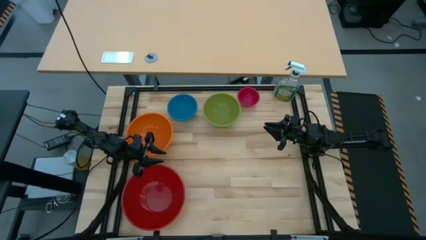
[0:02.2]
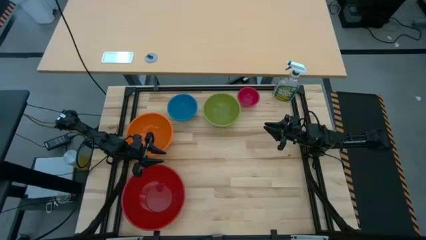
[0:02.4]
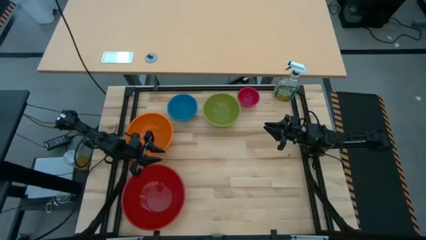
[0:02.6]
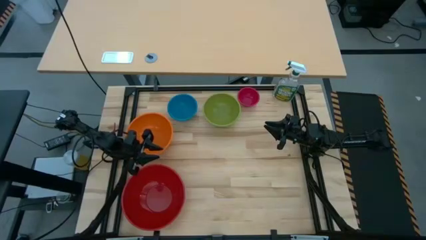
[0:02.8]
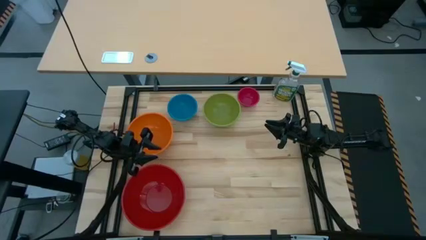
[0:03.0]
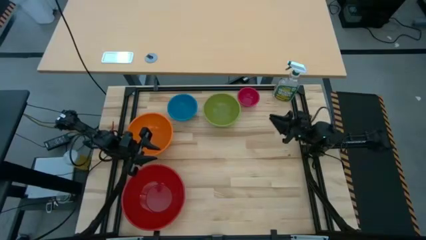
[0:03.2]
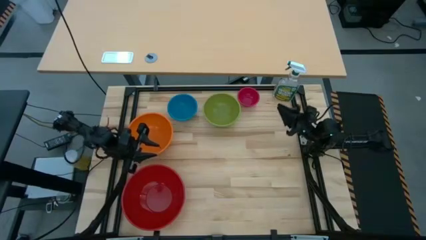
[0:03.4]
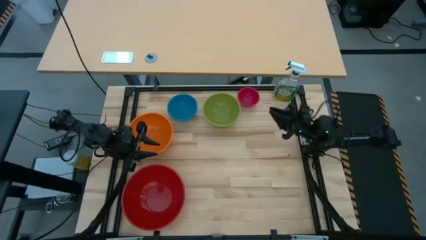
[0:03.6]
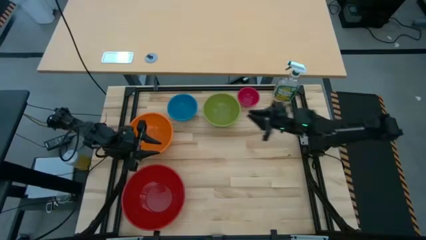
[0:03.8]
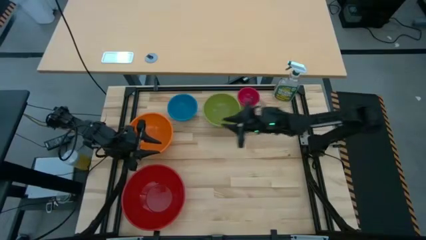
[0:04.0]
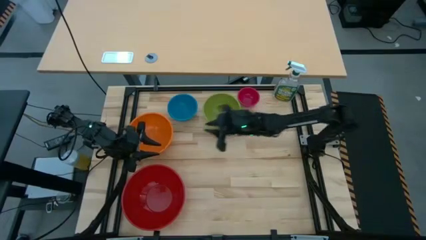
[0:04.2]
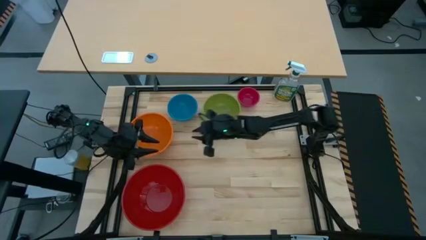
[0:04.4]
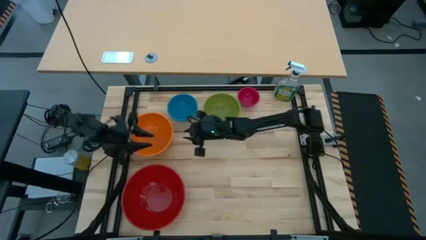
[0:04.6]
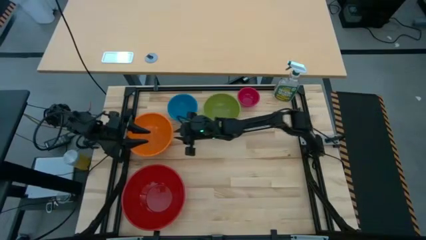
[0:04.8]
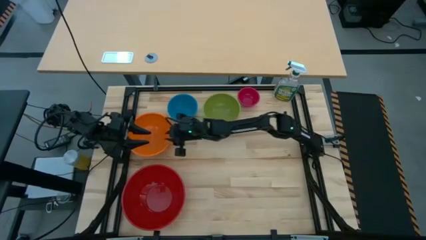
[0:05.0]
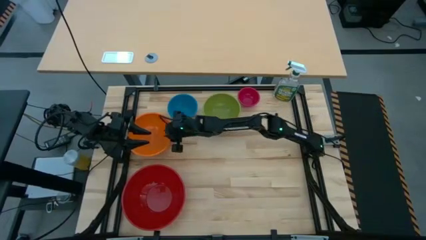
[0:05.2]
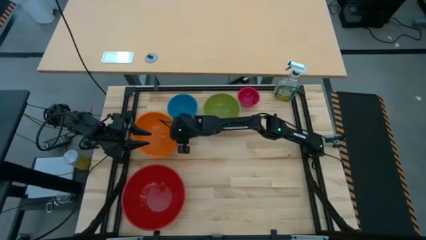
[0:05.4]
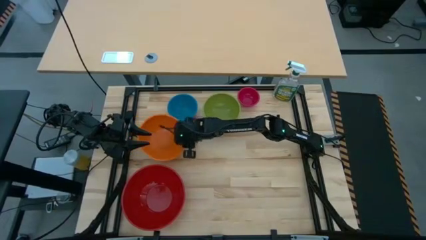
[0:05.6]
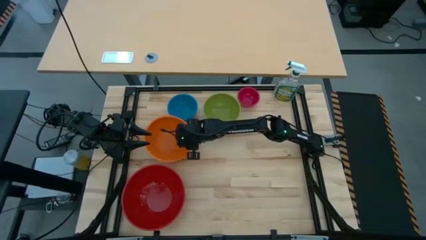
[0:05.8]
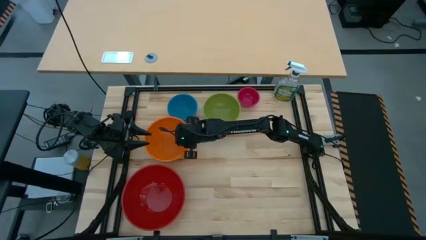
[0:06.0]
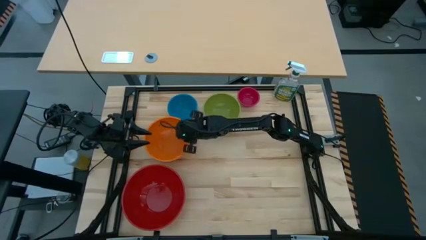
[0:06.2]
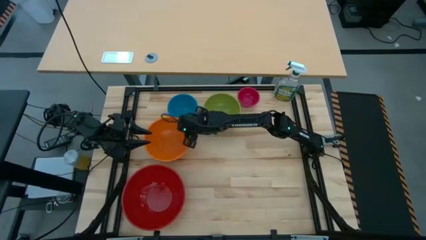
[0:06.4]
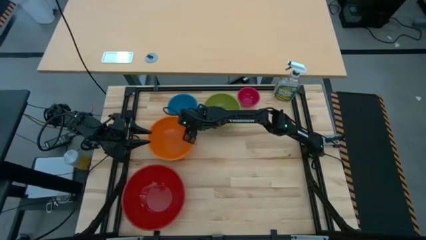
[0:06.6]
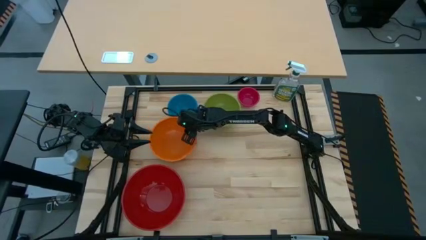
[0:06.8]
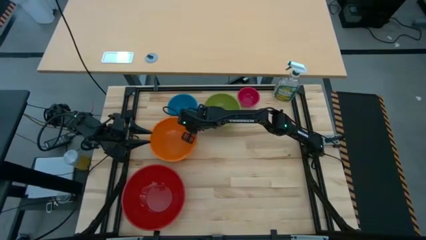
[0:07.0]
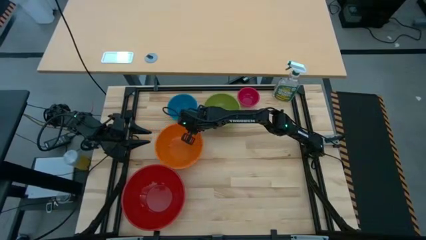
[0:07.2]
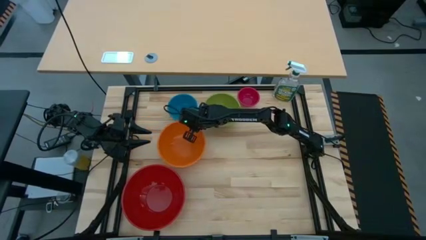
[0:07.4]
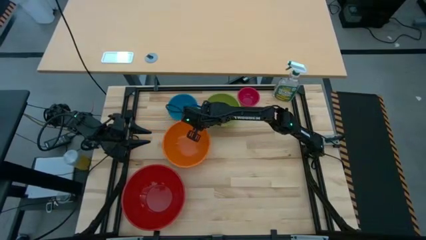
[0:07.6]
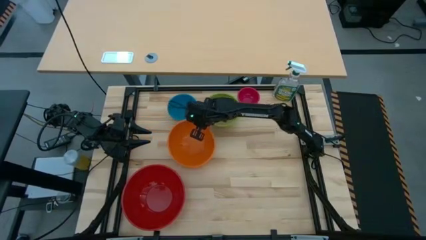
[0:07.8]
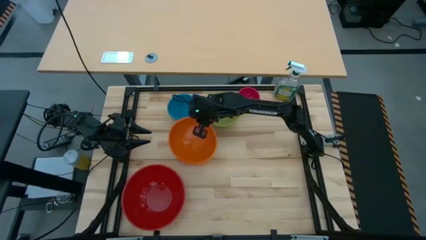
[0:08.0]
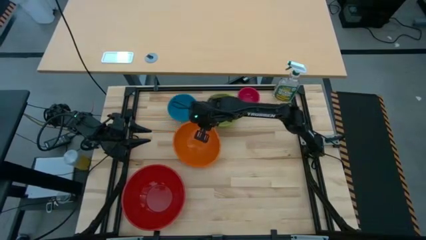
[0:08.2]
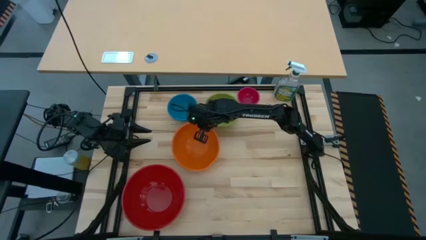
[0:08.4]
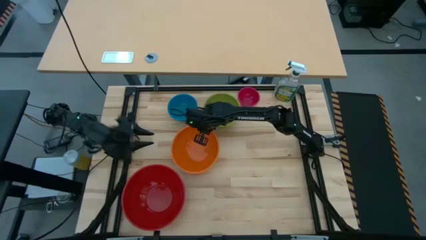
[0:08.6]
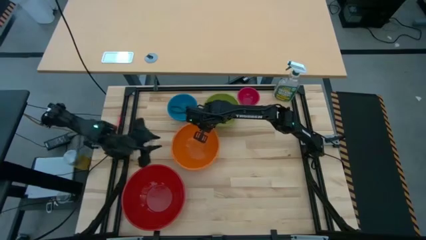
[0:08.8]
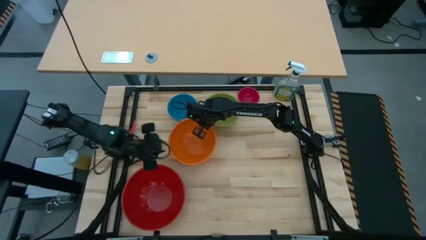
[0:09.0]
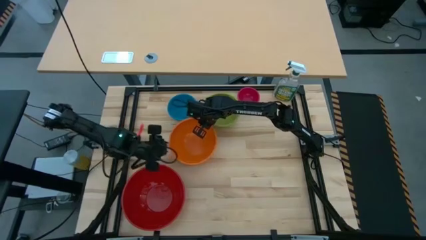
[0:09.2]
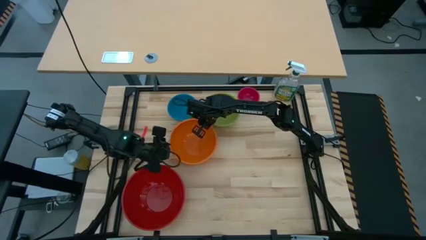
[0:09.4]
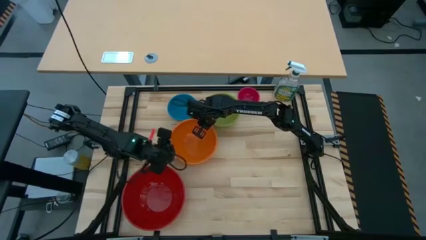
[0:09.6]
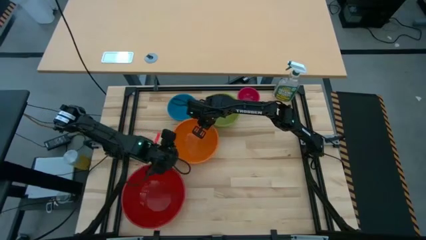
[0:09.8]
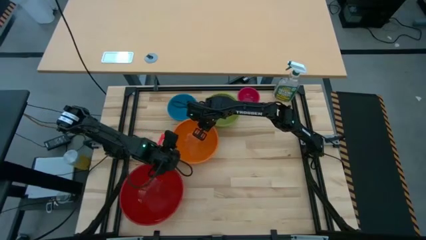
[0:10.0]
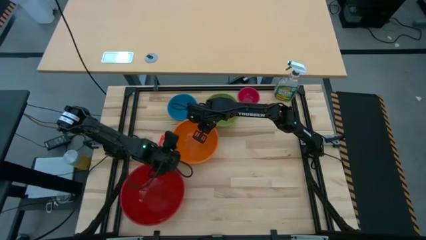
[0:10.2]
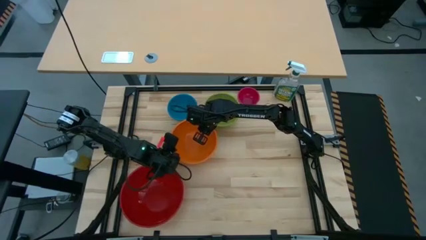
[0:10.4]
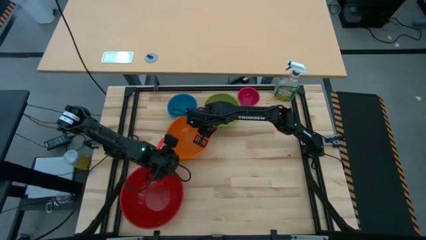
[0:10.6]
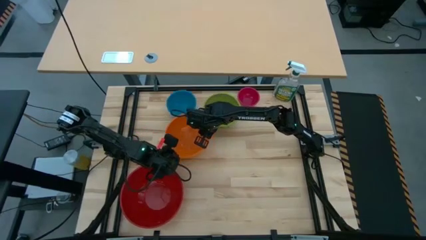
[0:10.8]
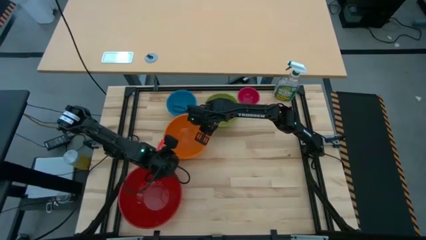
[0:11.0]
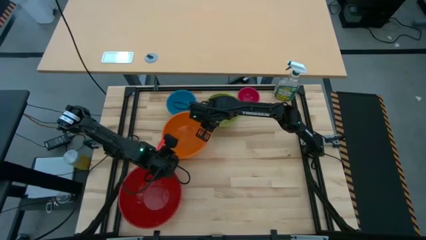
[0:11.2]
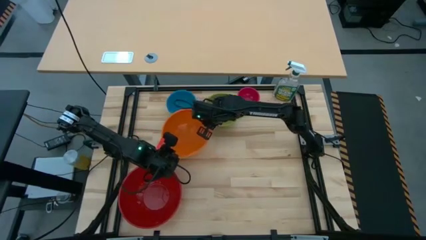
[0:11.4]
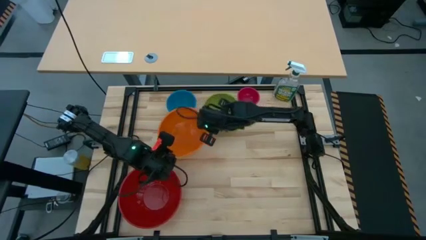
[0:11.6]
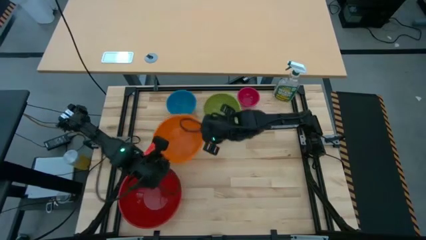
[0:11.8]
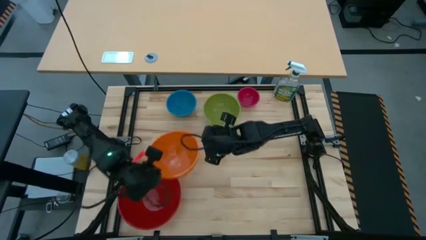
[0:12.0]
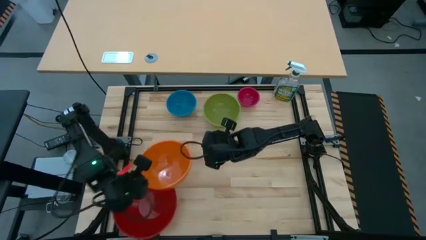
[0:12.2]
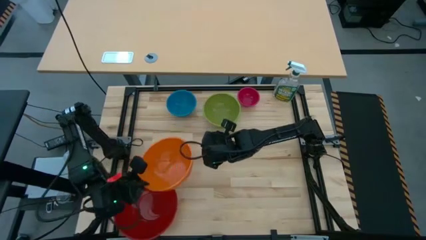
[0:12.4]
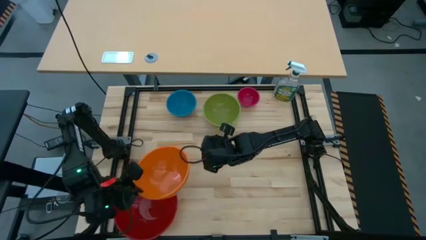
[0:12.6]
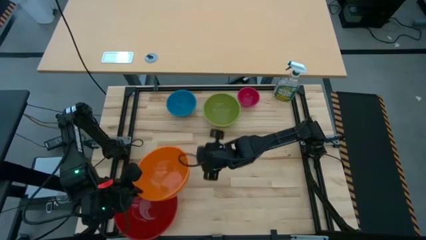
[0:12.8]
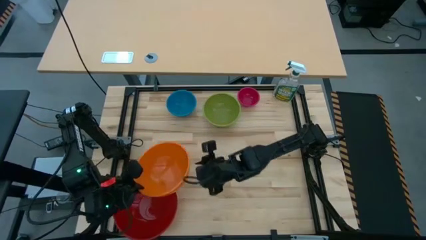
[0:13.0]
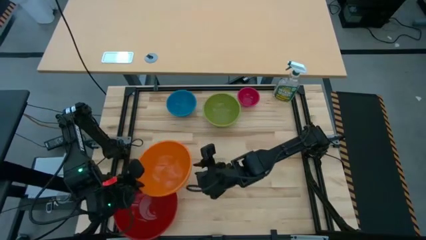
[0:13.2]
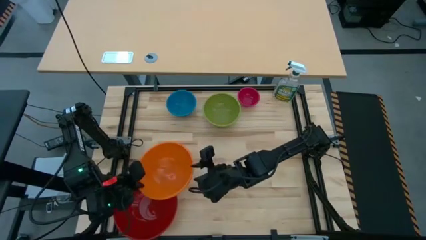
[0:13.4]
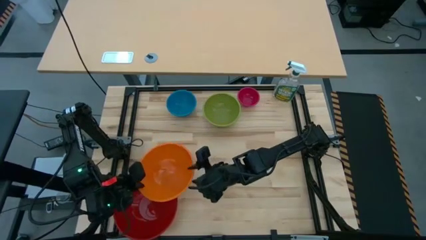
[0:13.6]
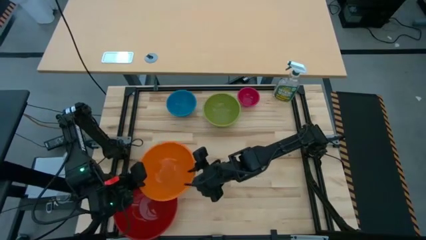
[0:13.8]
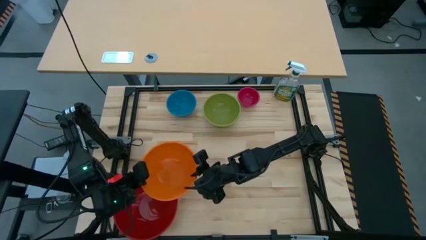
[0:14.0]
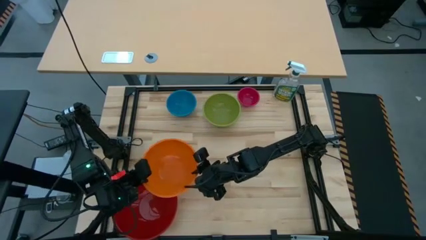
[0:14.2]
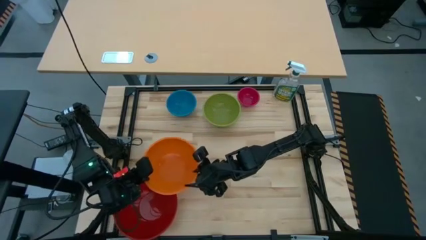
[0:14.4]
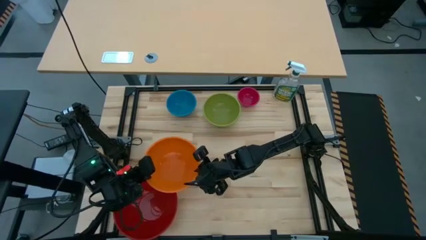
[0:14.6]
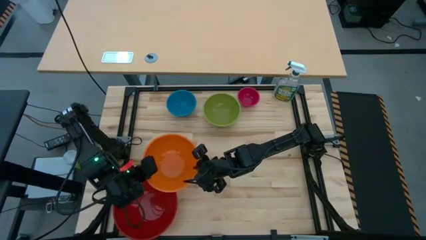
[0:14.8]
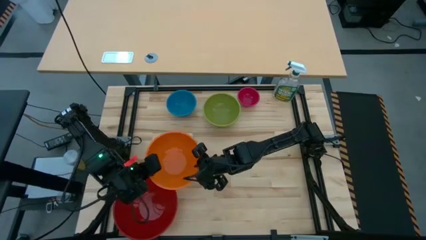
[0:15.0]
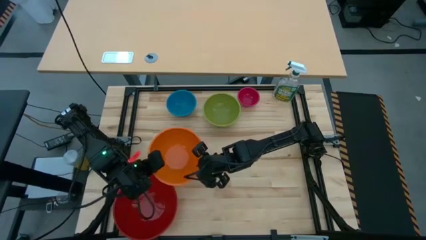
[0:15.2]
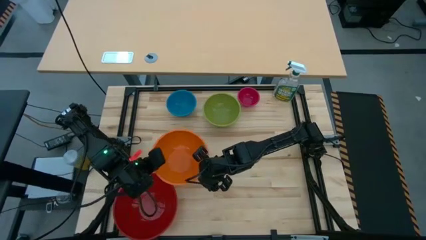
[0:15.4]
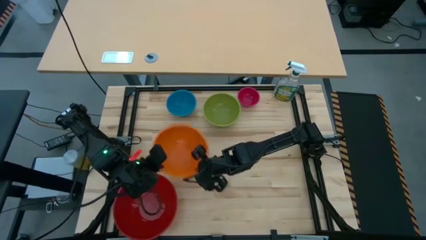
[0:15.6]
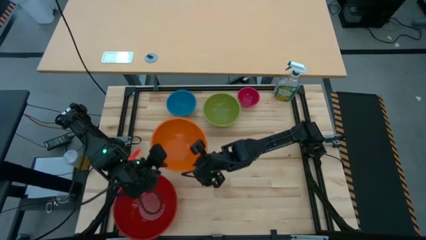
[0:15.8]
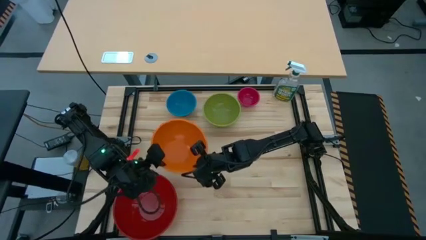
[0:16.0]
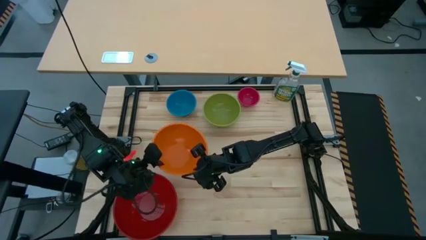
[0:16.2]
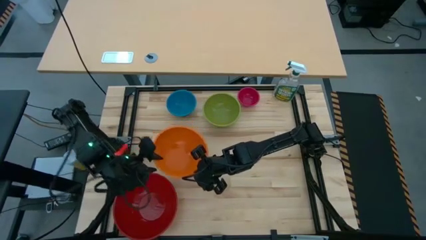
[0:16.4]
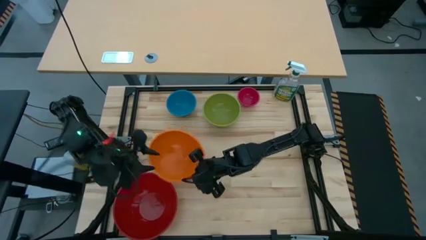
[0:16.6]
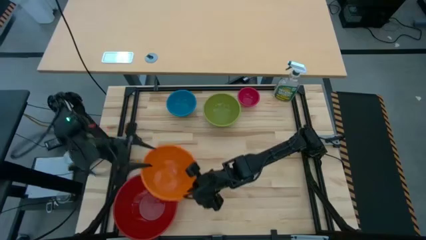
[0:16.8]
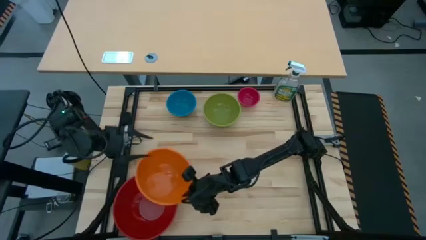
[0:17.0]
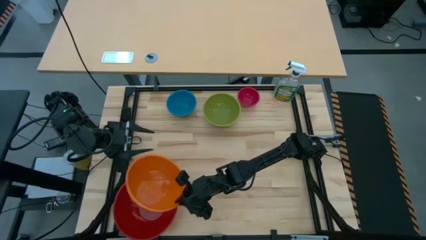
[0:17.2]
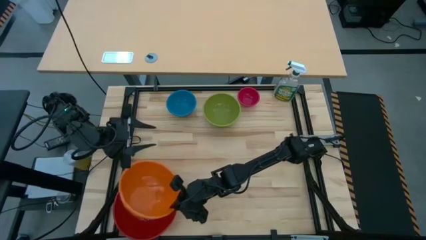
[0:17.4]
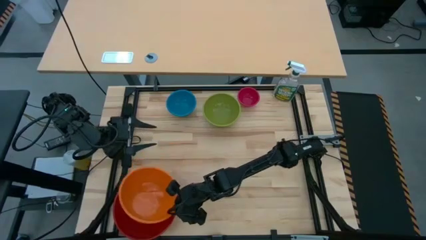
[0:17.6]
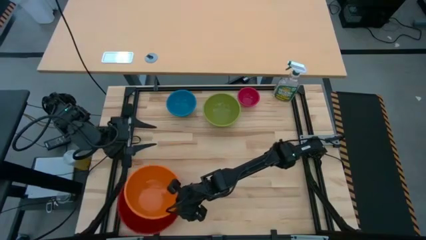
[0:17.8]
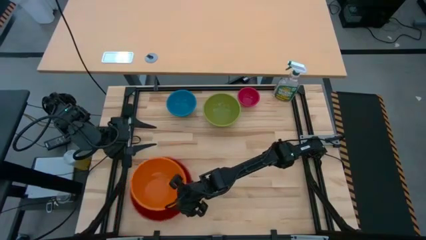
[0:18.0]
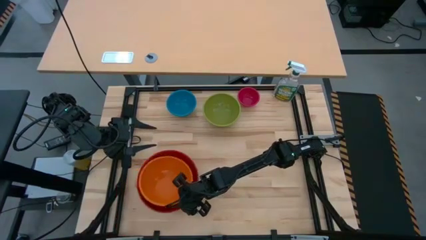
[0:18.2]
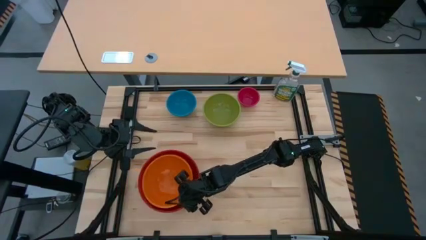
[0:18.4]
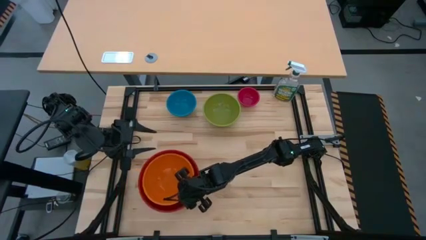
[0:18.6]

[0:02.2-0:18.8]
Stack the orange bowl on top of the red bowl
